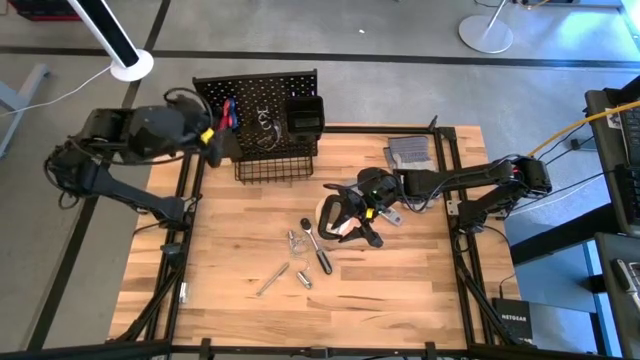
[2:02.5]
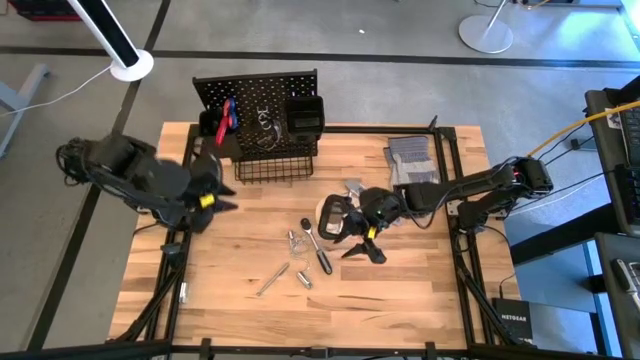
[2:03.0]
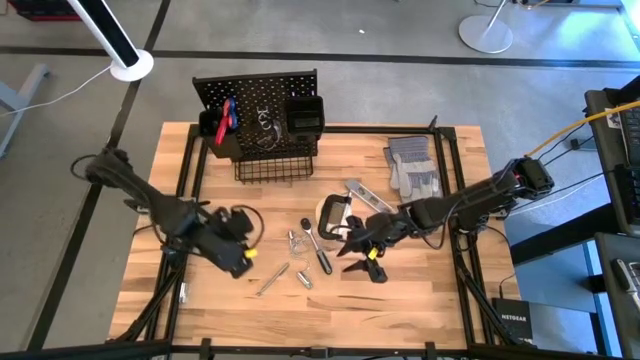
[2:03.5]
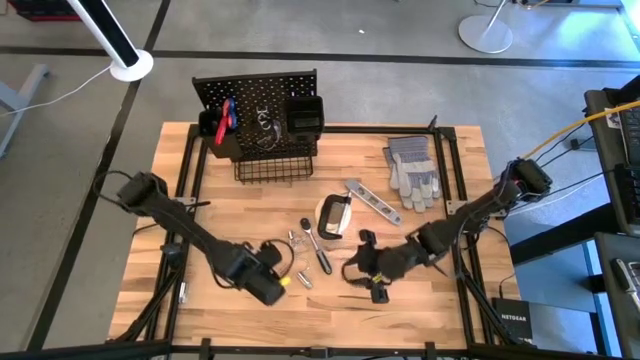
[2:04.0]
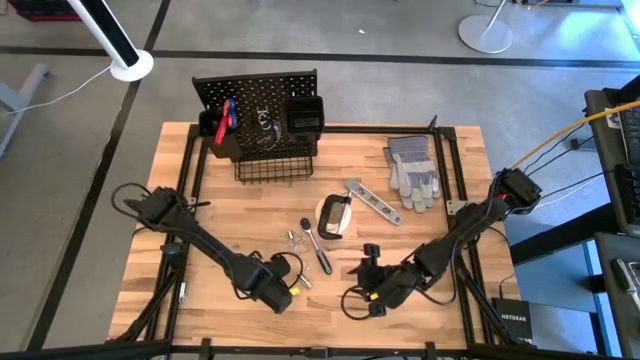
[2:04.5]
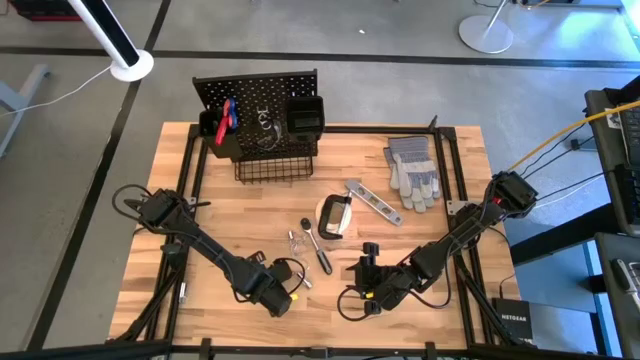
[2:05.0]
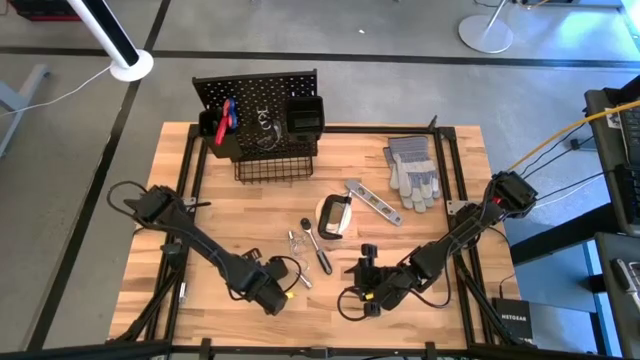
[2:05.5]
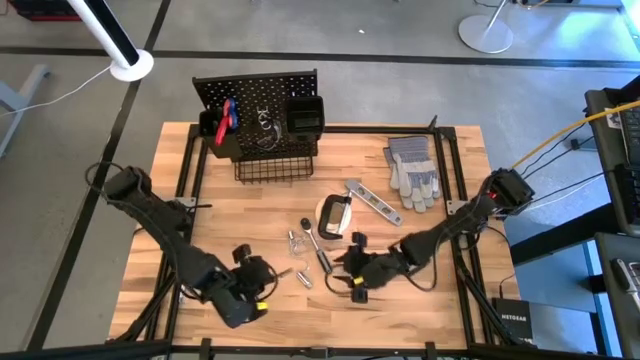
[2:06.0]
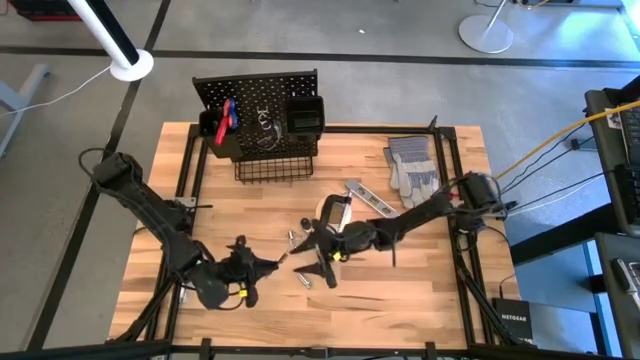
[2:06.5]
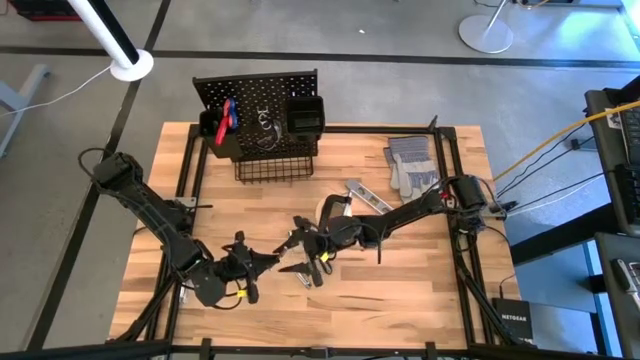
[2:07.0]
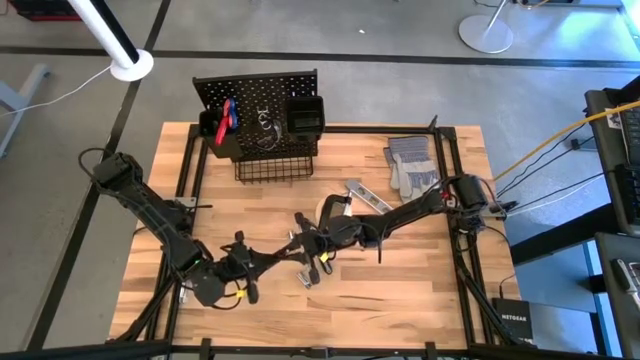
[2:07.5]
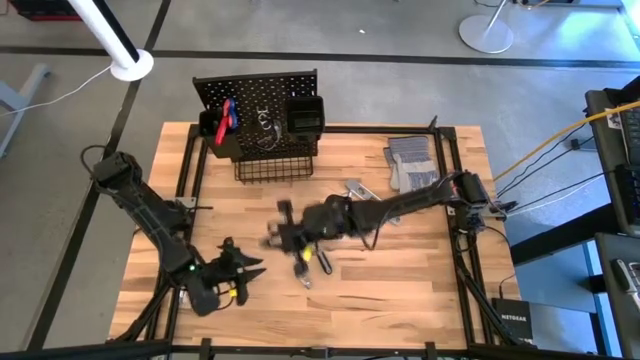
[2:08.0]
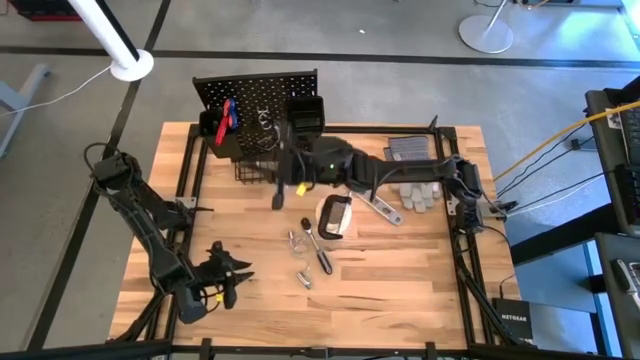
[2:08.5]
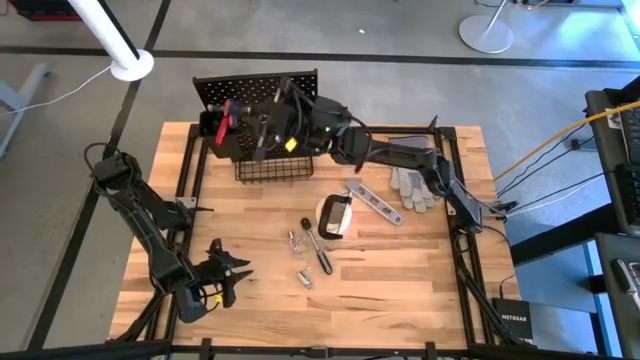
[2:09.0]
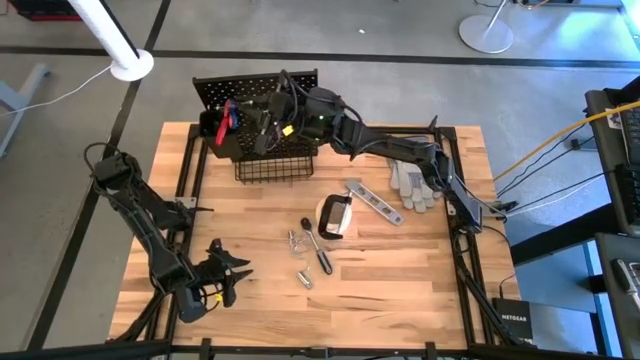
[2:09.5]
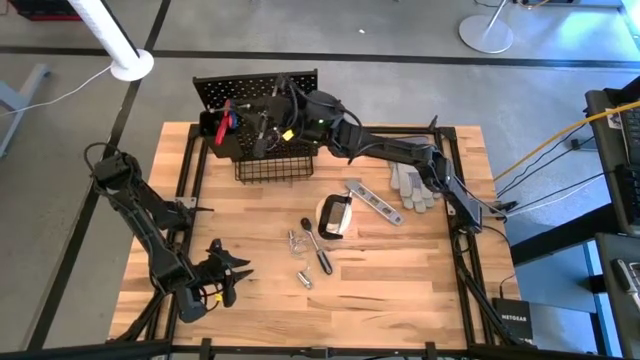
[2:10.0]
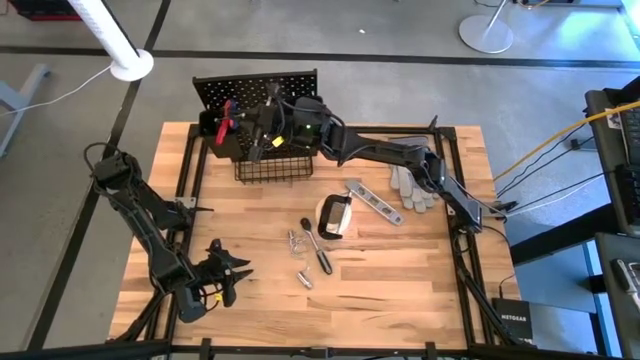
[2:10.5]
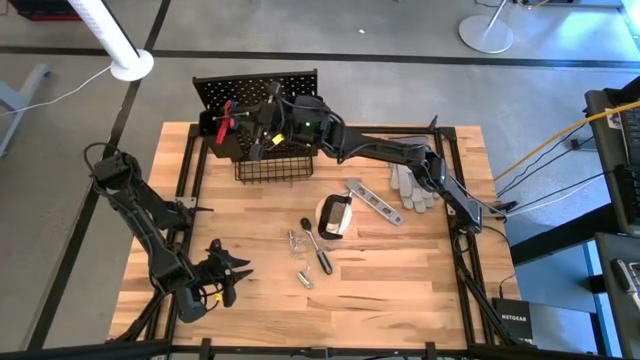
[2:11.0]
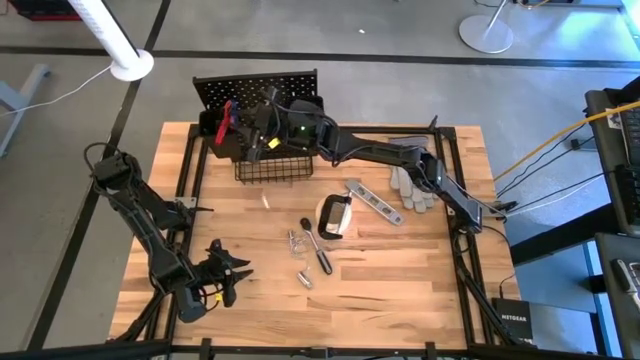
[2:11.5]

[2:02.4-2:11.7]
Task: Hang tools onto peg board
Put the silver magnetic telescoping tool into the left black bin on the pegboard

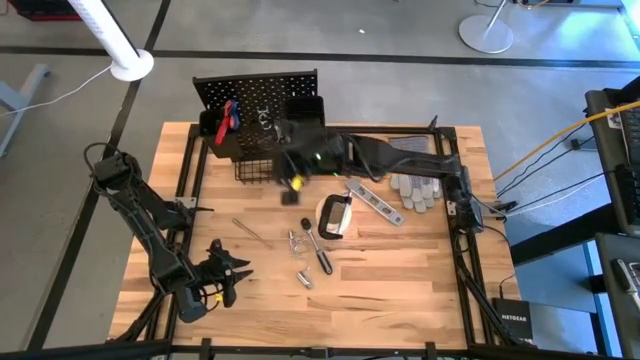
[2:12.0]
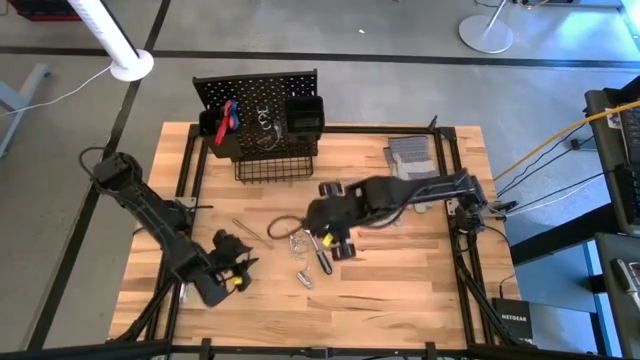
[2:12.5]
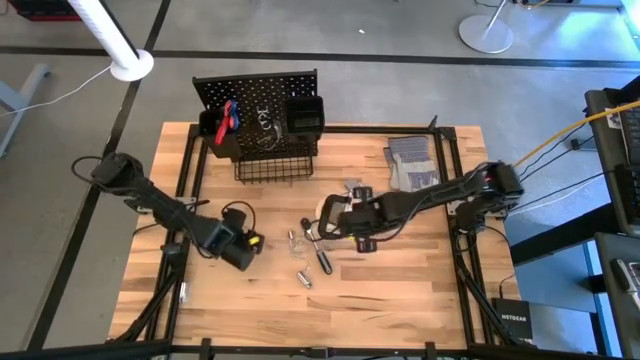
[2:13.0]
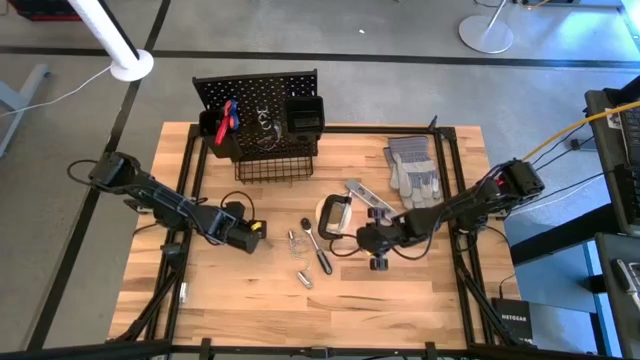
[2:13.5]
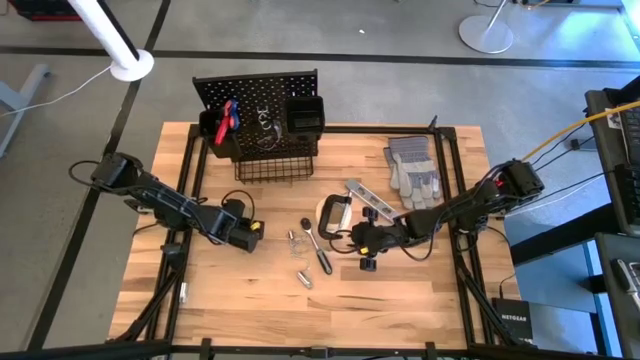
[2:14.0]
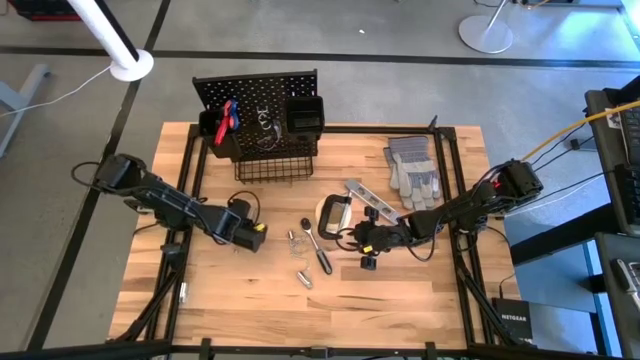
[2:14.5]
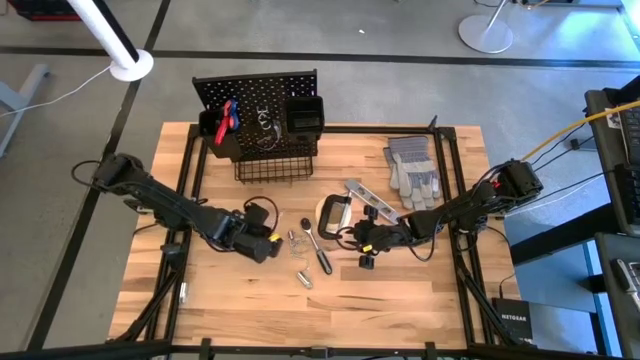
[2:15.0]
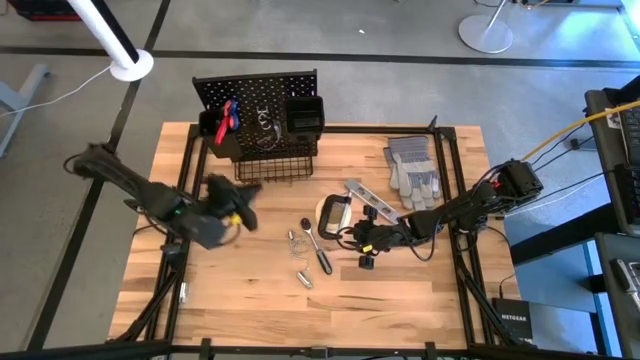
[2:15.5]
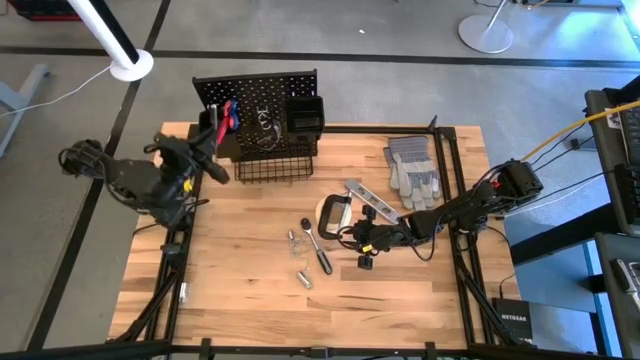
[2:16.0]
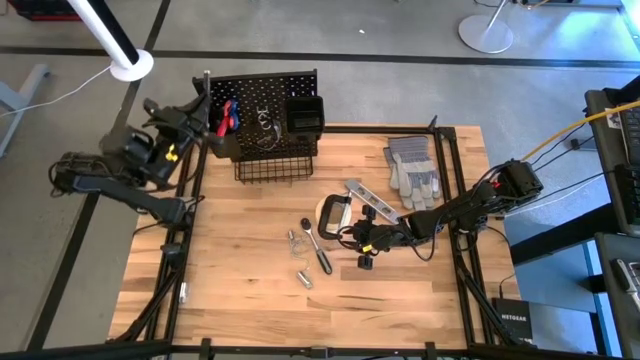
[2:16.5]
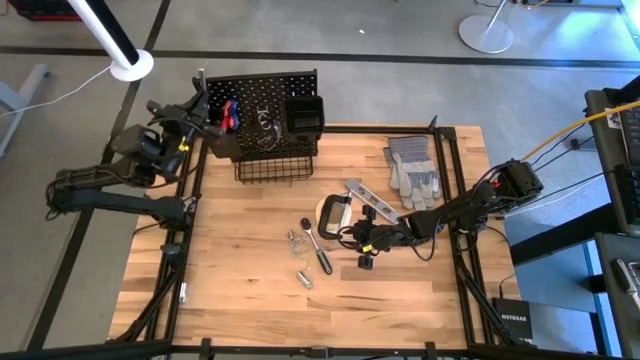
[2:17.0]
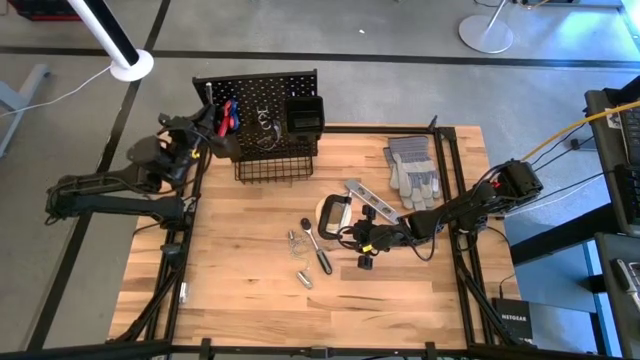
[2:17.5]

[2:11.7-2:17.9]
Put the silver magnetic telescoping tool into the left black bin on the pegboard

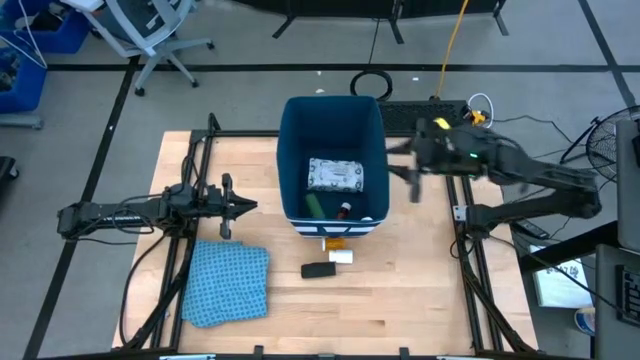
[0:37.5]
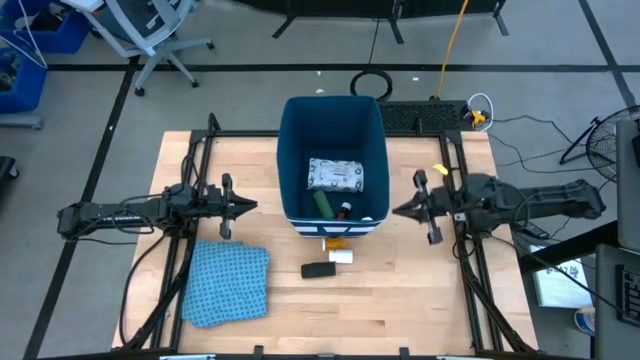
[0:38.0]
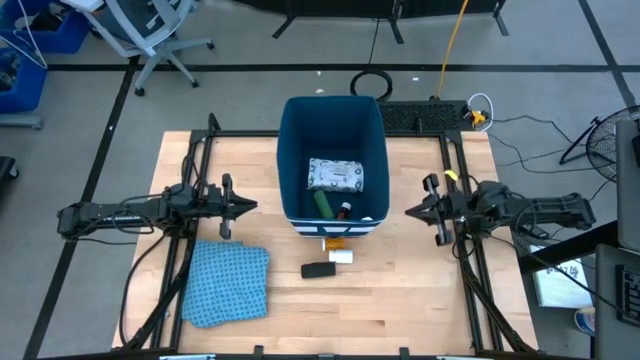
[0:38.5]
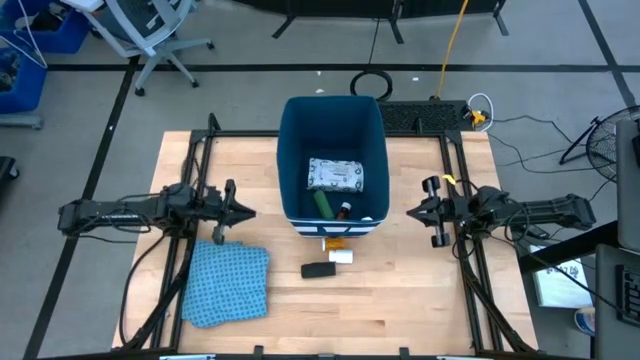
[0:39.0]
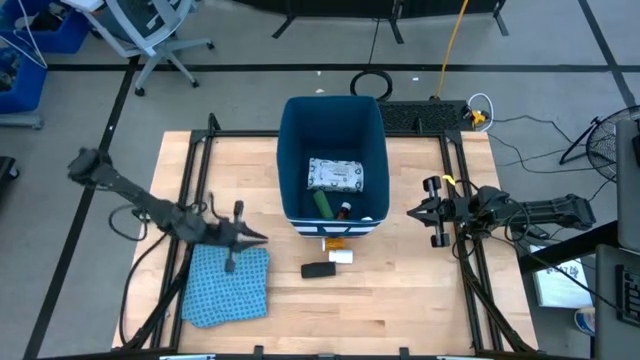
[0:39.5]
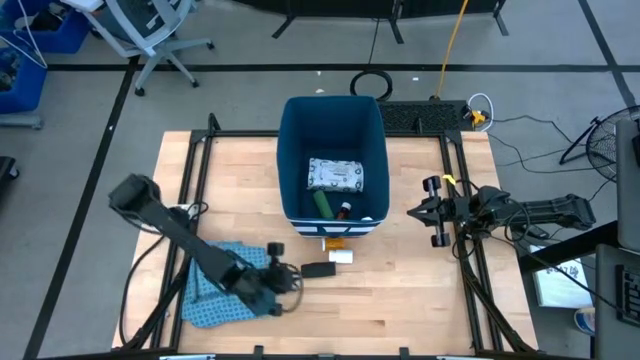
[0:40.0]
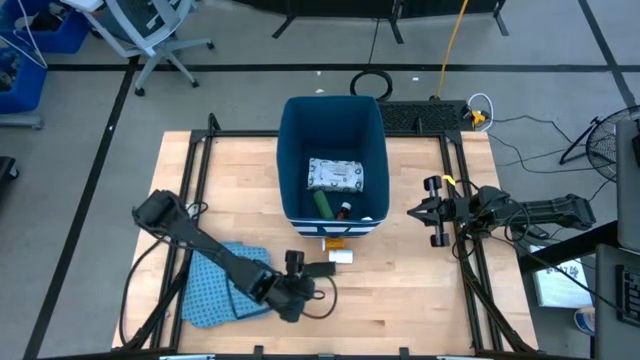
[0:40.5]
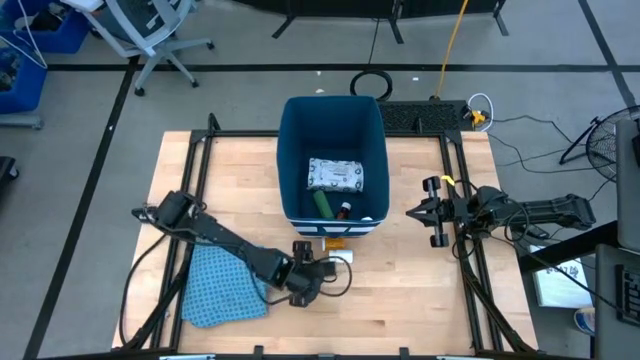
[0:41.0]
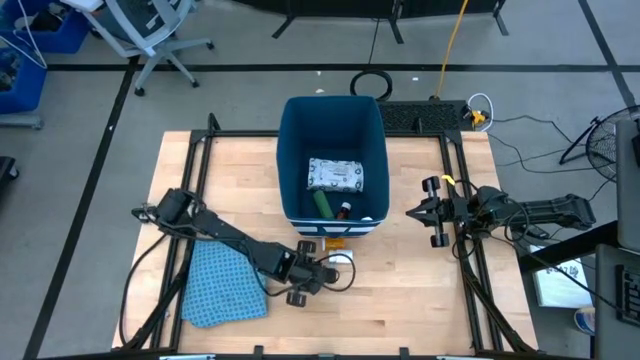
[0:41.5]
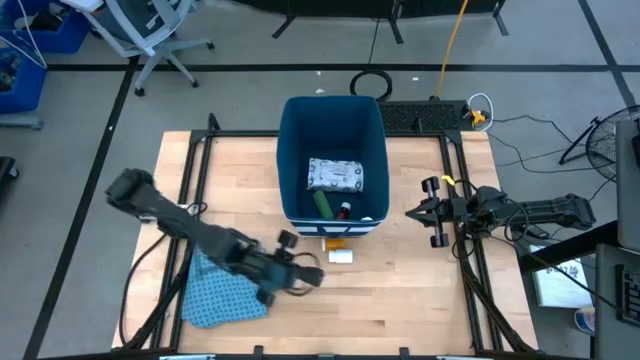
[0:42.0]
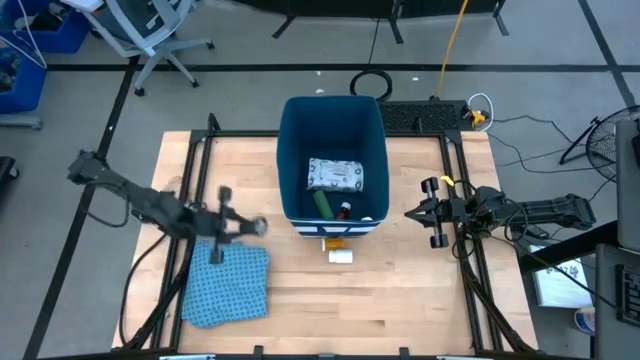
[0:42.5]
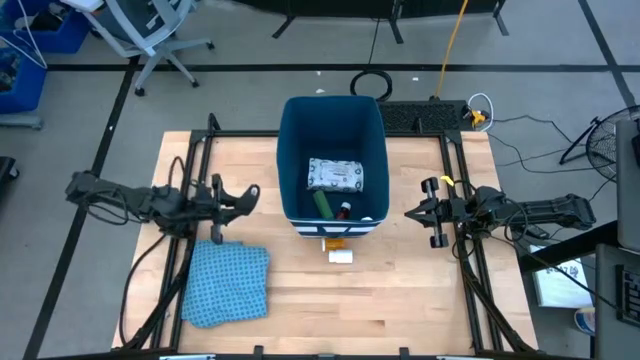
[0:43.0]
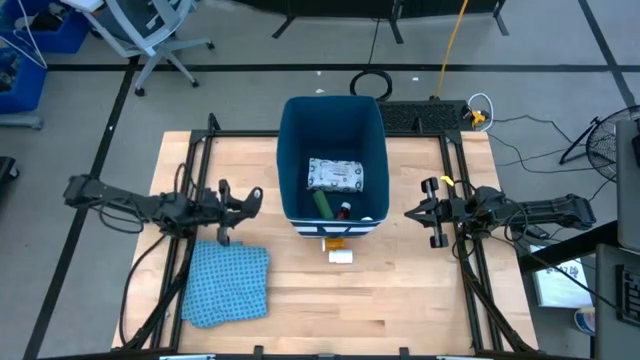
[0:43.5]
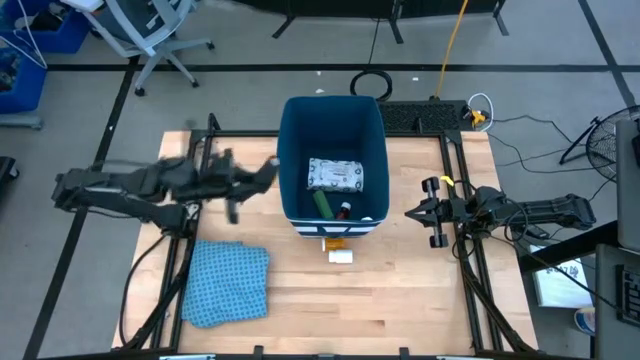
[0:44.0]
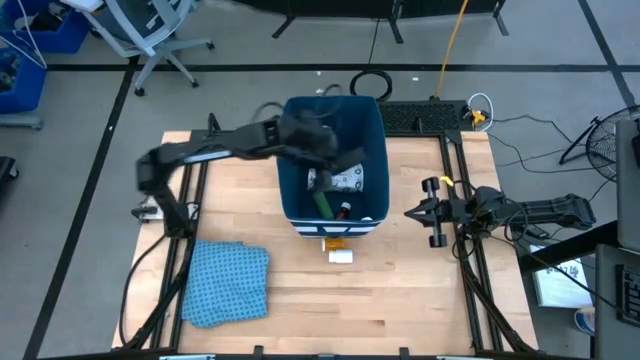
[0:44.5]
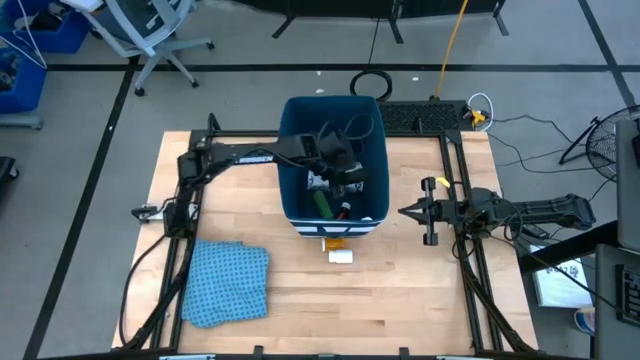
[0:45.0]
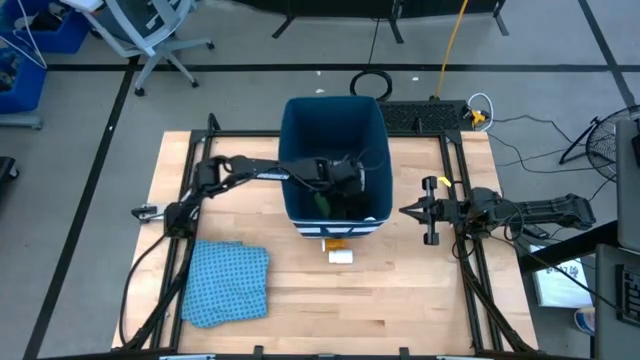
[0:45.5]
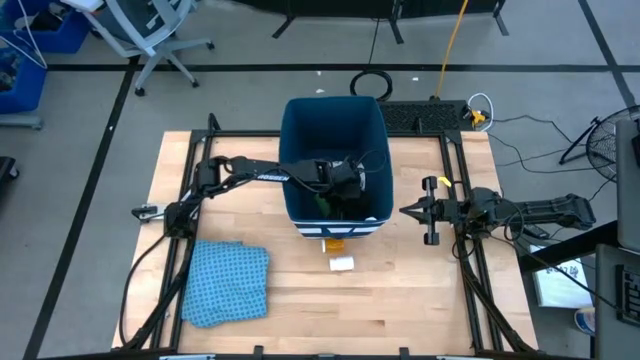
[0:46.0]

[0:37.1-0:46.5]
Task: Pick & place medical supplies in basket/bin
Put the black bandage into the blue bin
